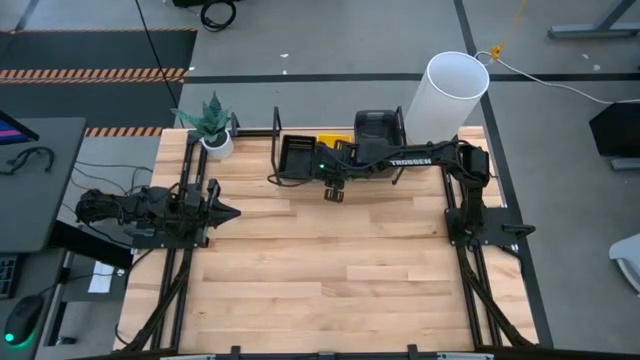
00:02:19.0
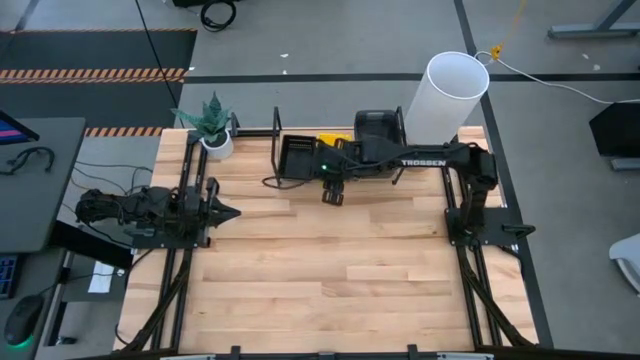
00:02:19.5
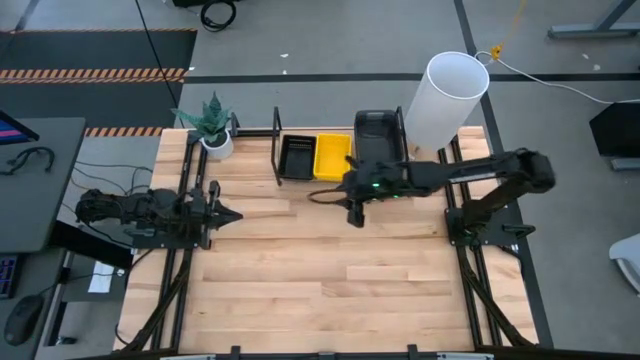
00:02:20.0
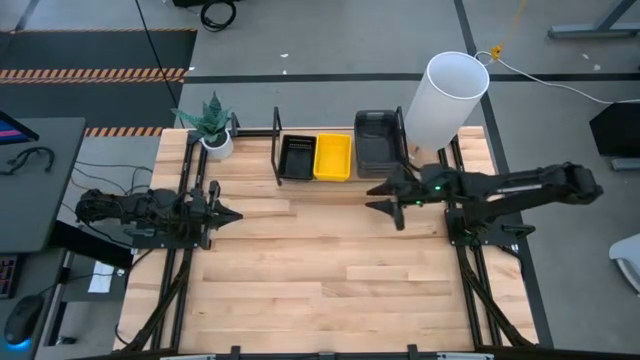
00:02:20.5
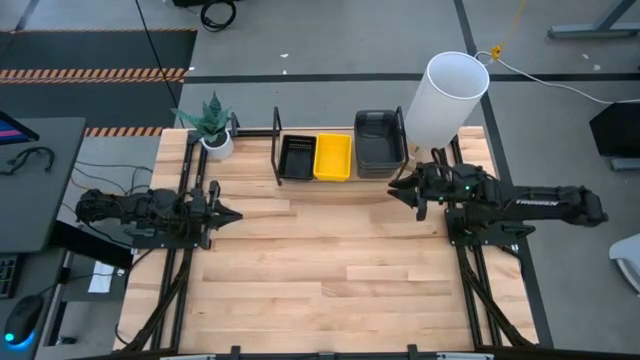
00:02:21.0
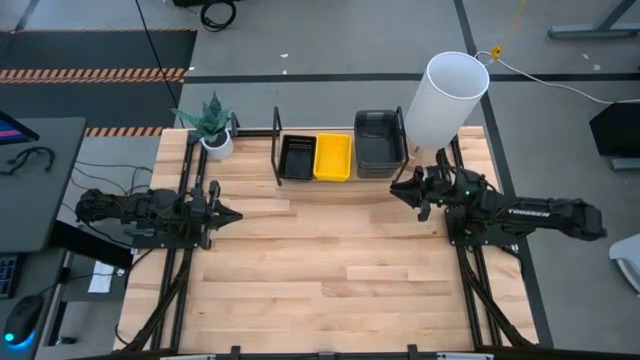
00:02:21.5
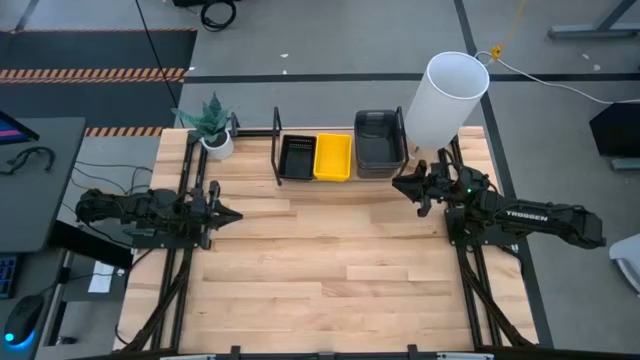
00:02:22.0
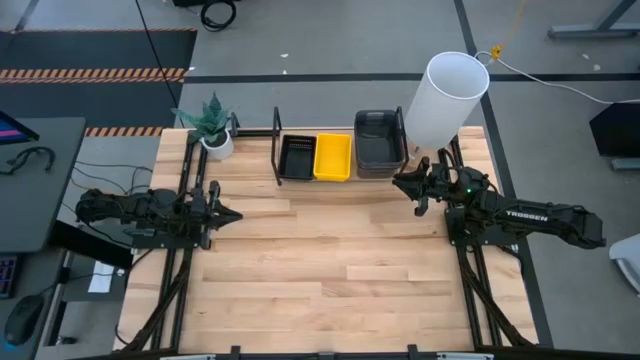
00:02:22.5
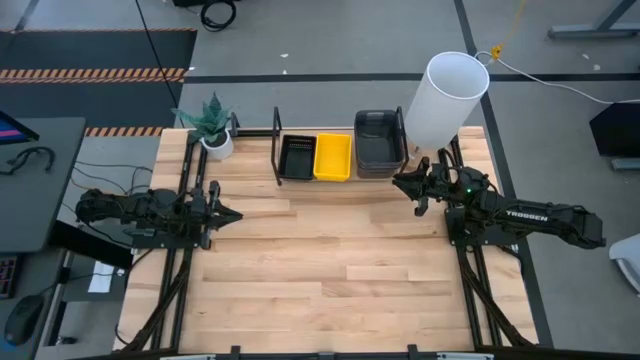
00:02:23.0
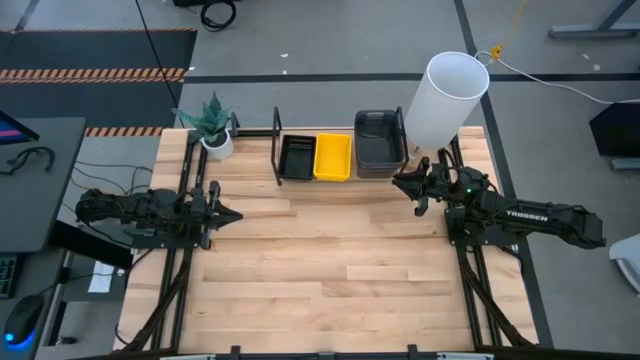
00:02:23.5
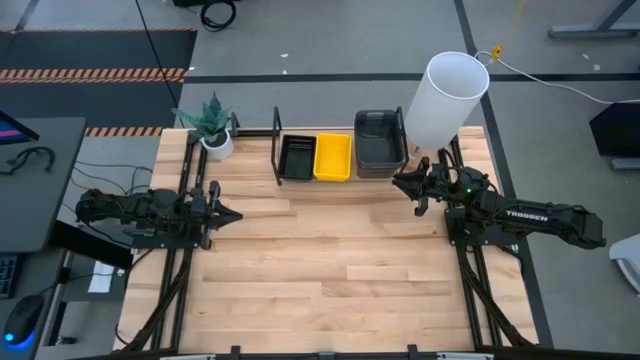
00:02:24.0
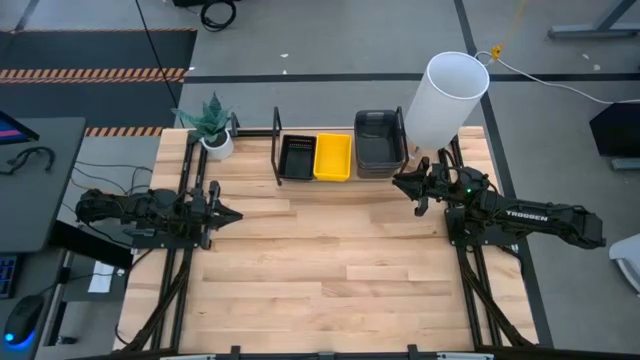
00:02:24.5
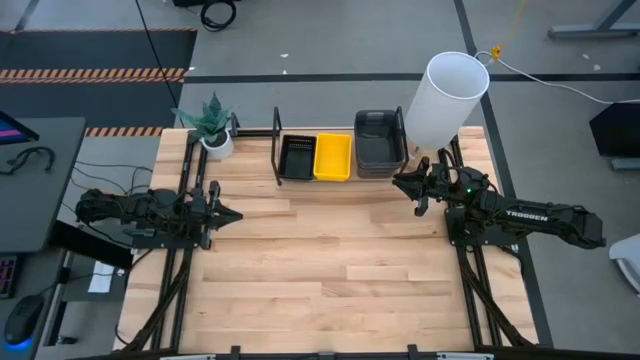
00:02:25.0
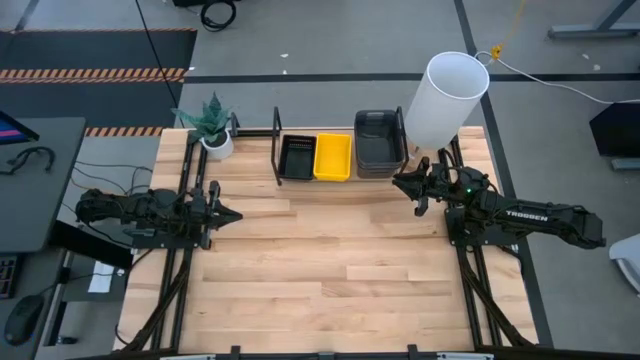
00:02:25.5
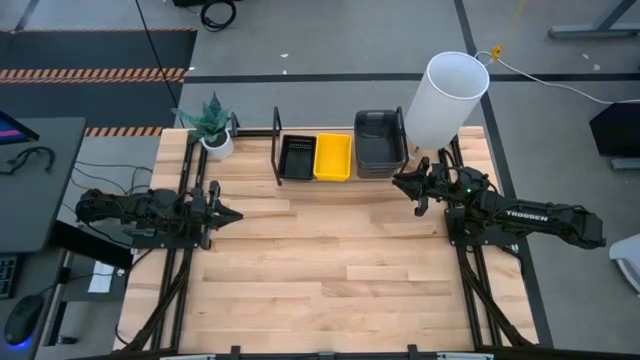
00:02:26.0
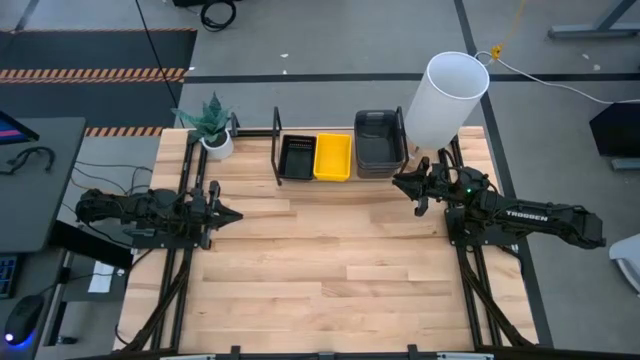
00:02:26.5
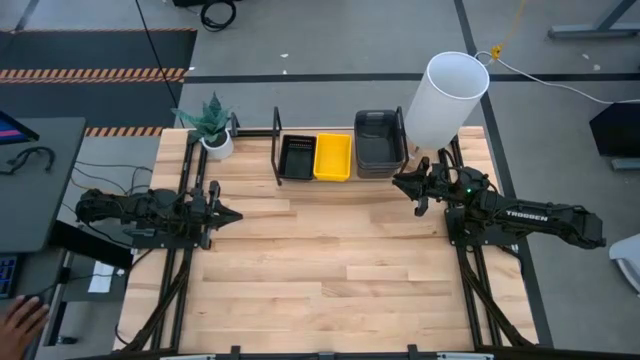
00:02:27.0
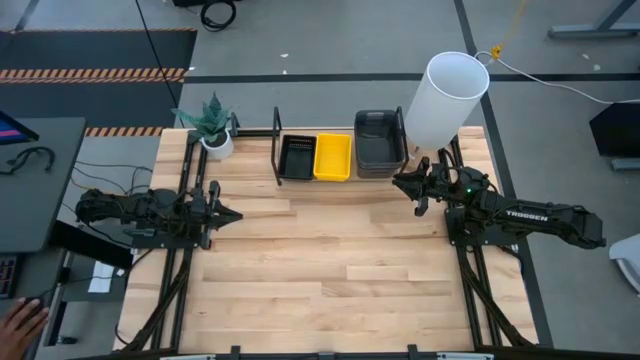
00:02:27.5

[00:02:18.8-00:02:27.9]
Task: Stack baskets on shelf by color
Return to Home Position

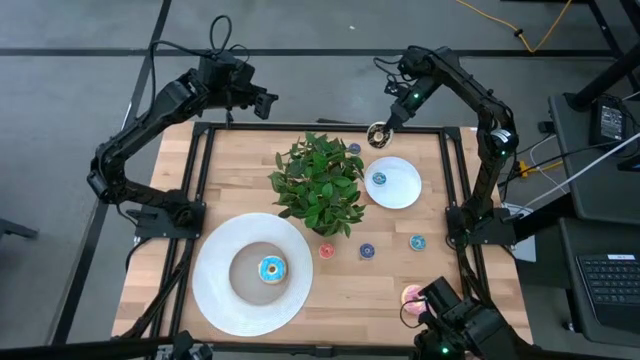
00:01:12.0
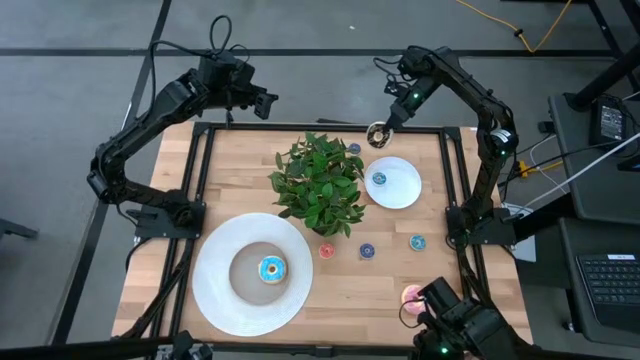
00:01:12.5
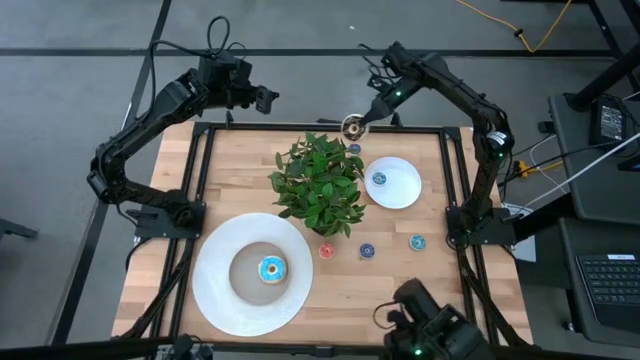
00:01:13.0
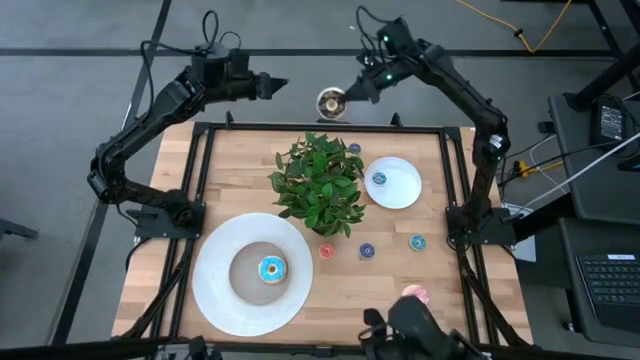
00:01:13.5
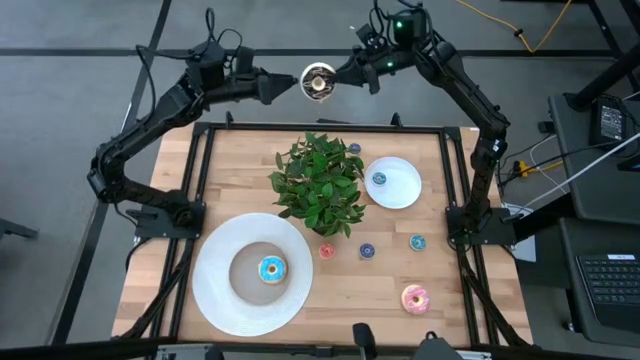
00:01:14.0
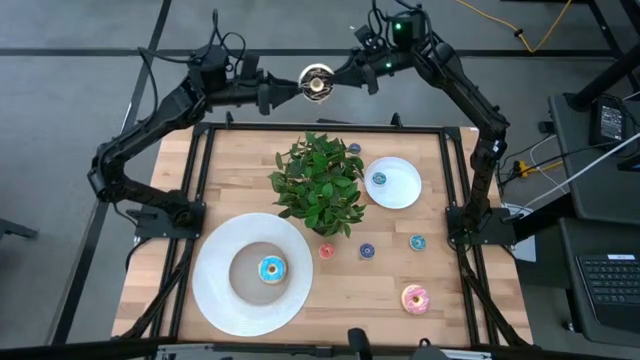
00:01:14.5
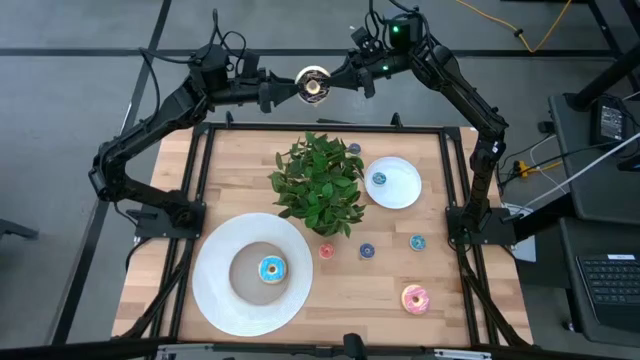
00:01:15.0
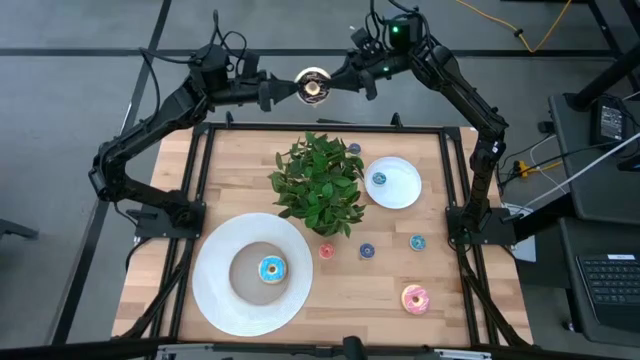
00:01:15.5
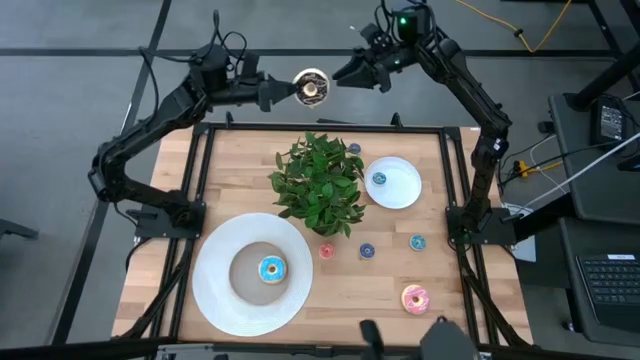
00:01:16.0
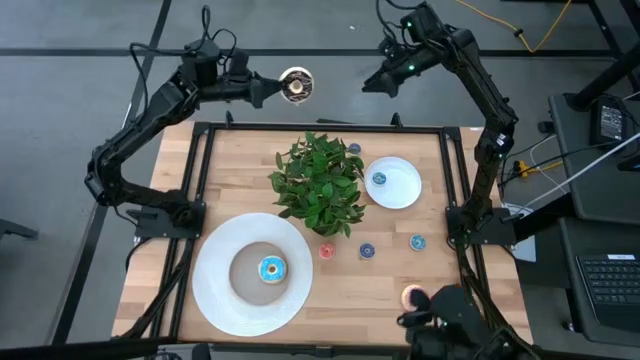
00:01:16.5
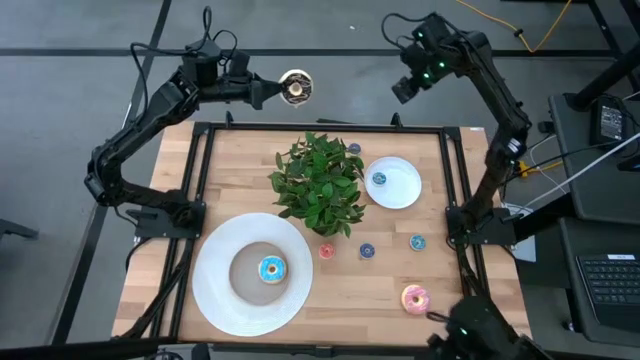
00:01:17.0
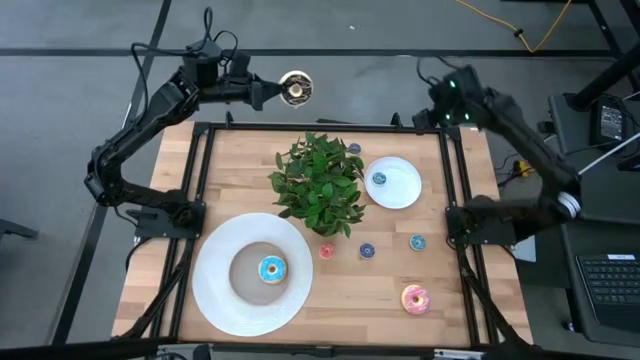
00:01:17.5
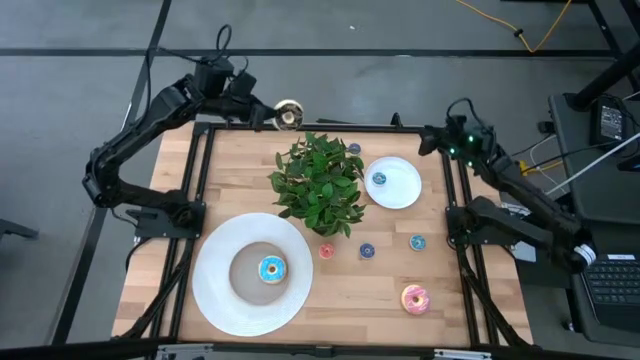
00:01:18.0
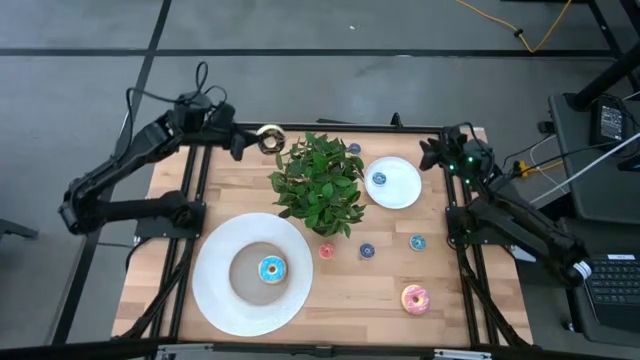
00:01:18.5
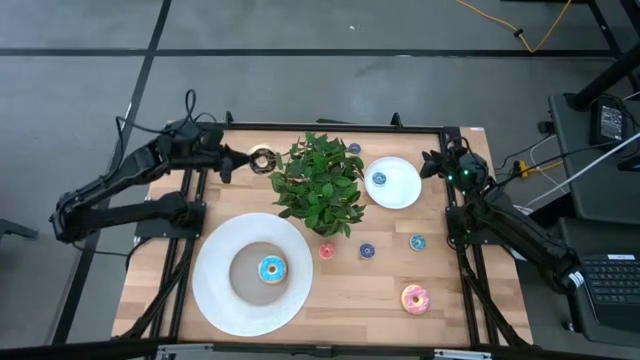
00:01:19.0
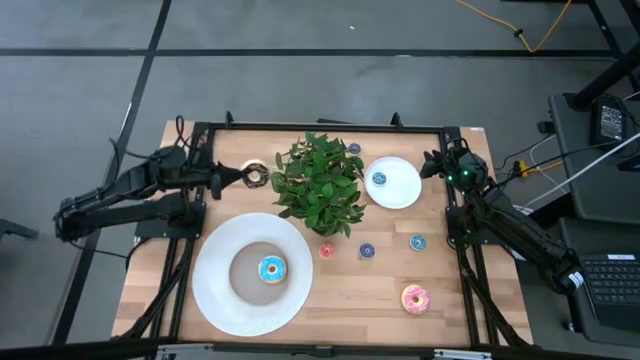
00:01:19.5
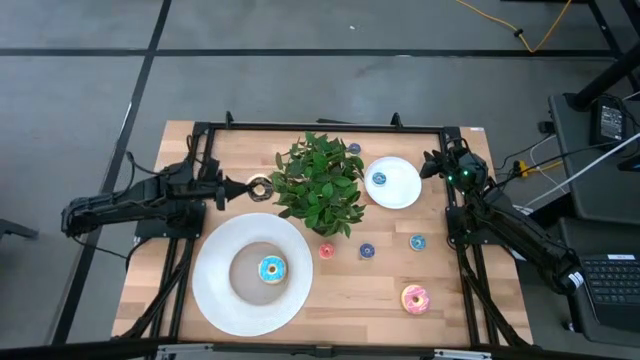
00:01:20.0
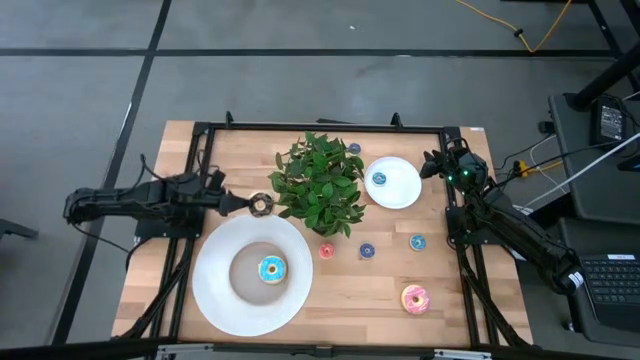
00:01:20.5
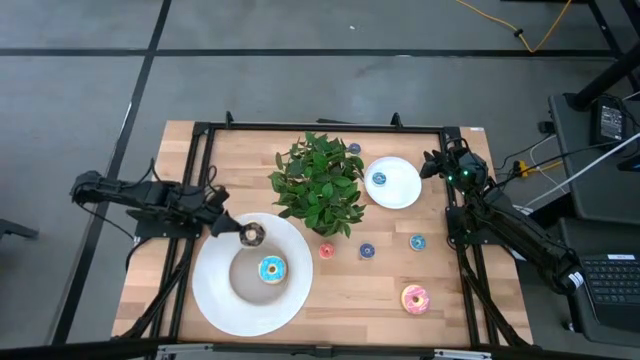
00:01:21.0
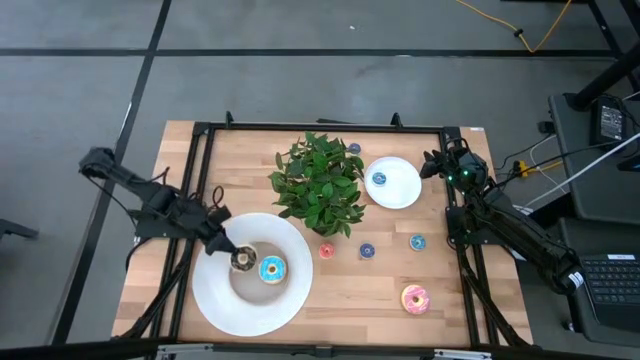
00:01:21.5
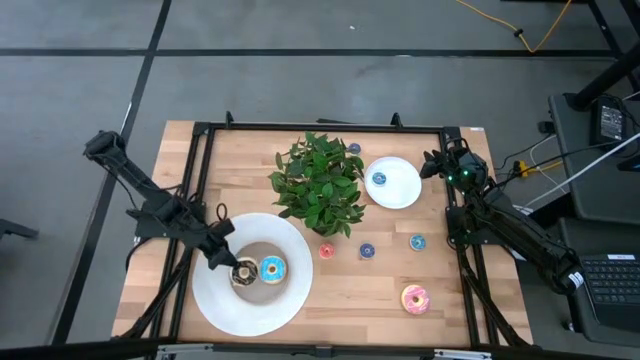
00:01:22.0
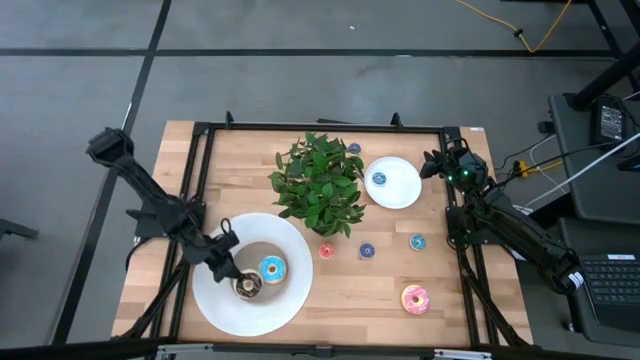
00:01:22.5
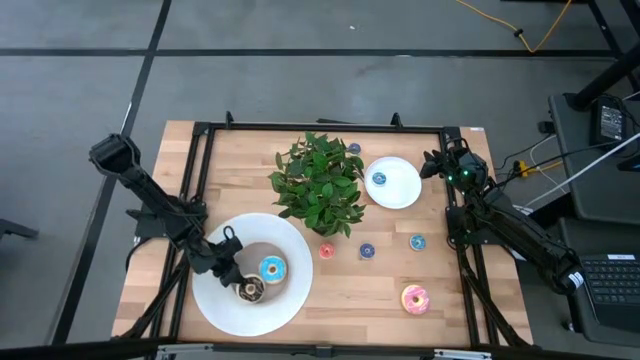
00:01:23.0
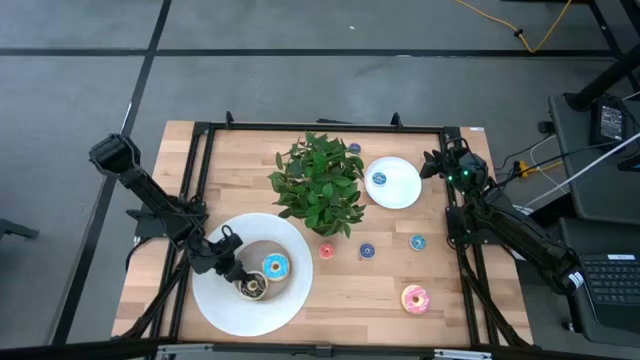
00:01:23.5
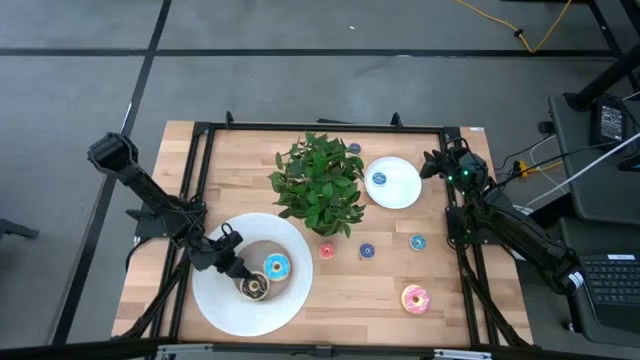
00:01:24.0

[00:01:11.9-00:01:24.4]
Task: Pick & Place donuts
Put the large black donut on the brown plate
